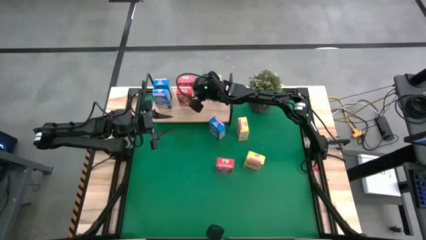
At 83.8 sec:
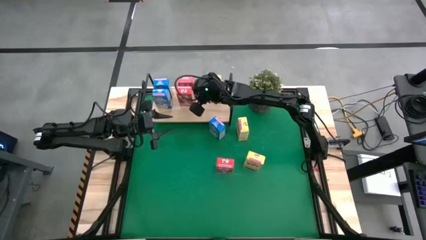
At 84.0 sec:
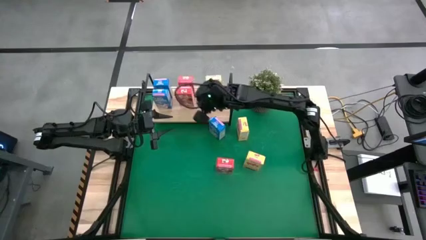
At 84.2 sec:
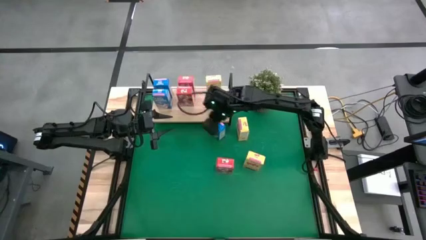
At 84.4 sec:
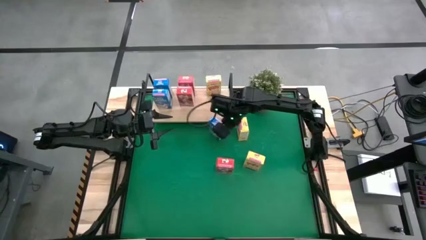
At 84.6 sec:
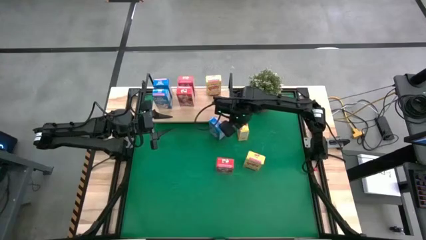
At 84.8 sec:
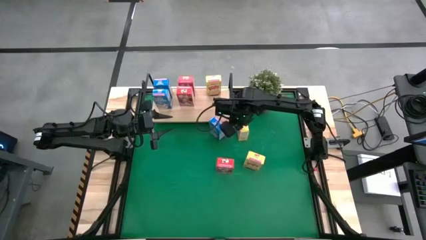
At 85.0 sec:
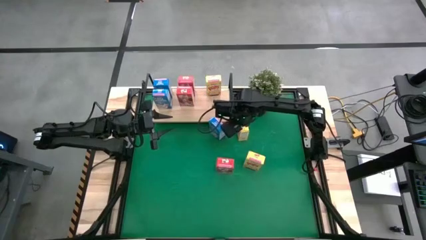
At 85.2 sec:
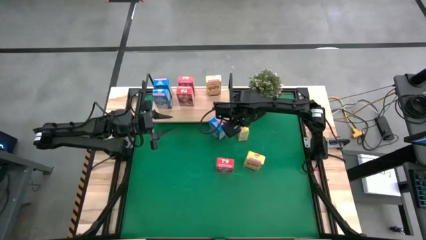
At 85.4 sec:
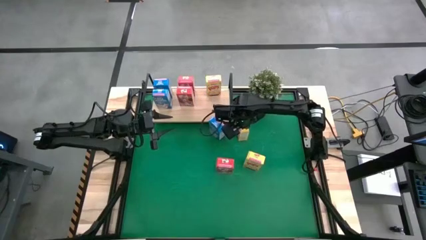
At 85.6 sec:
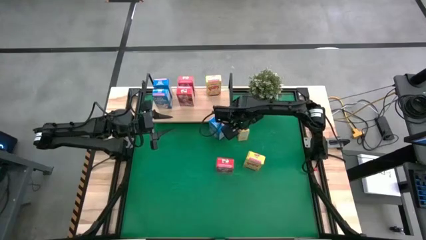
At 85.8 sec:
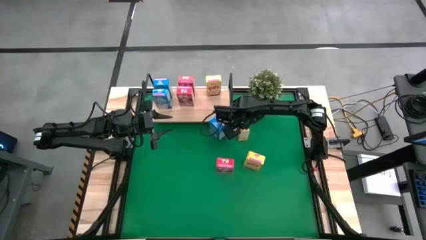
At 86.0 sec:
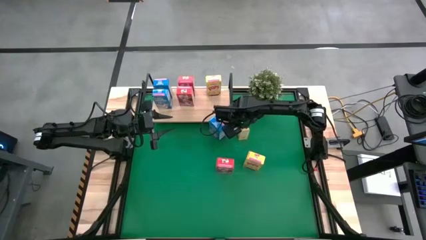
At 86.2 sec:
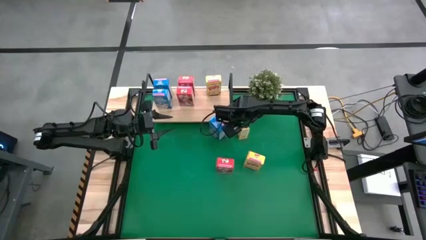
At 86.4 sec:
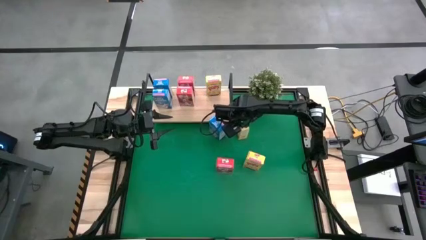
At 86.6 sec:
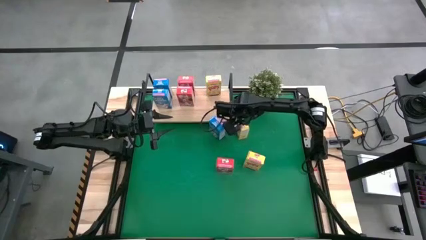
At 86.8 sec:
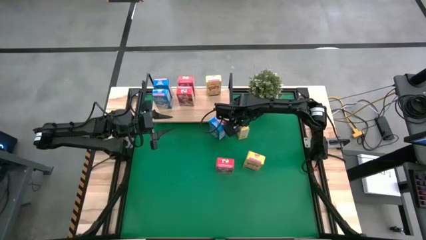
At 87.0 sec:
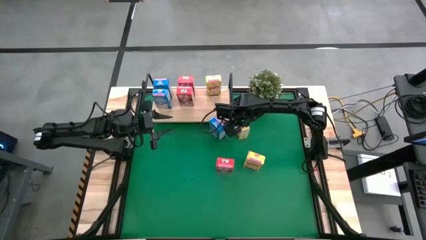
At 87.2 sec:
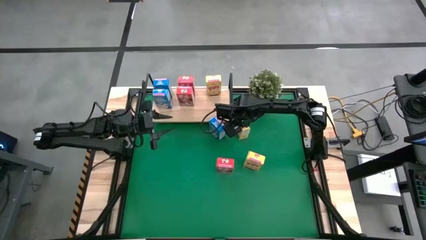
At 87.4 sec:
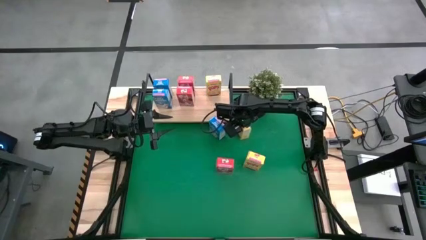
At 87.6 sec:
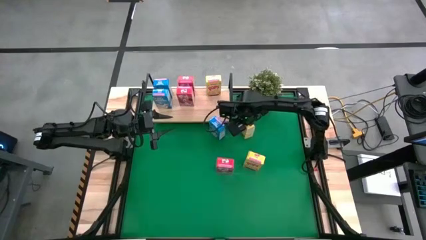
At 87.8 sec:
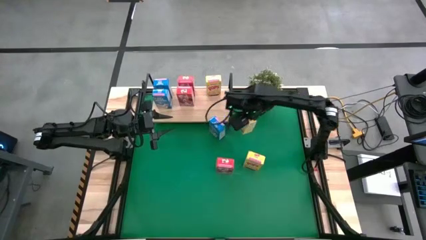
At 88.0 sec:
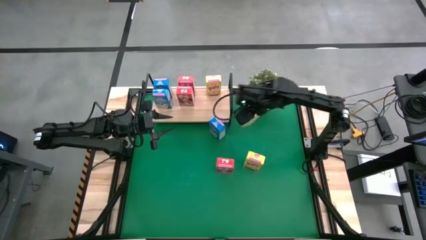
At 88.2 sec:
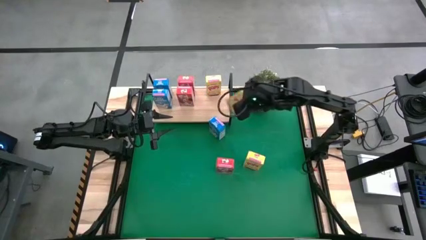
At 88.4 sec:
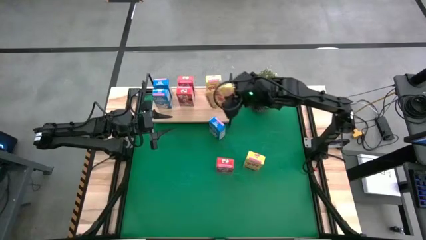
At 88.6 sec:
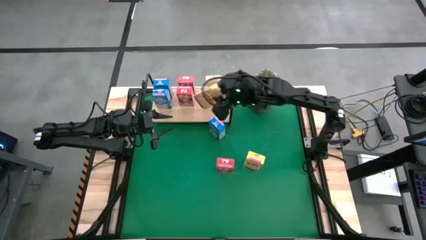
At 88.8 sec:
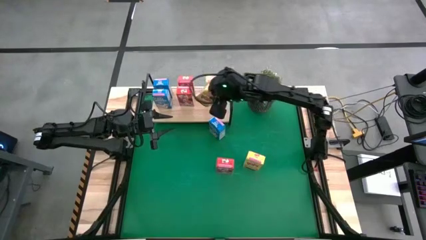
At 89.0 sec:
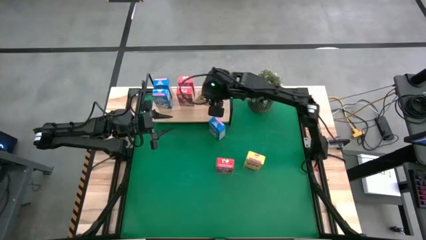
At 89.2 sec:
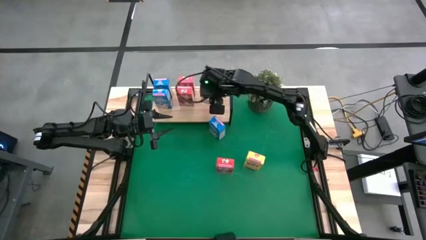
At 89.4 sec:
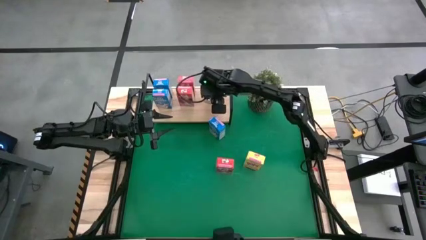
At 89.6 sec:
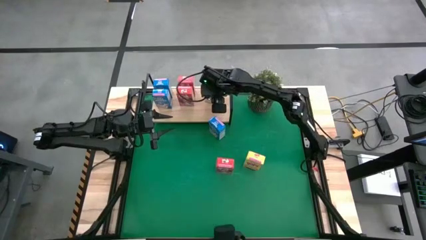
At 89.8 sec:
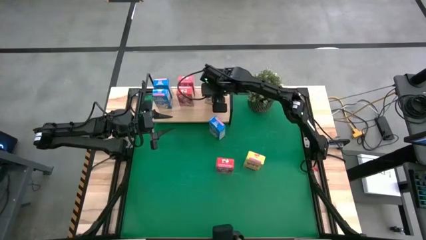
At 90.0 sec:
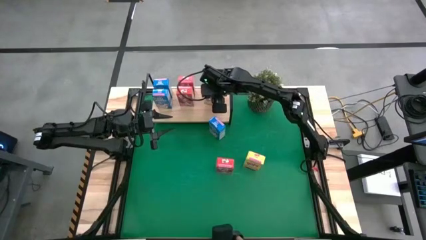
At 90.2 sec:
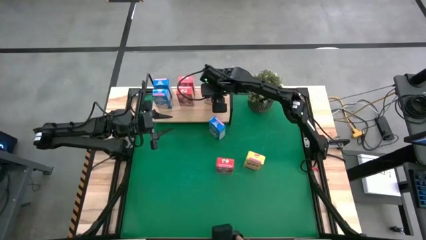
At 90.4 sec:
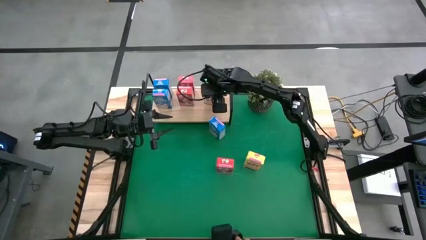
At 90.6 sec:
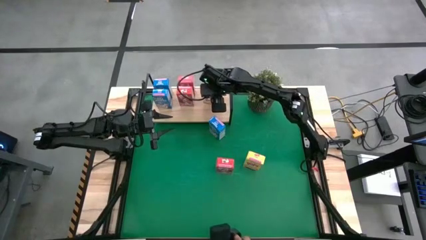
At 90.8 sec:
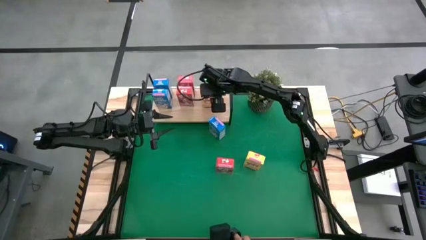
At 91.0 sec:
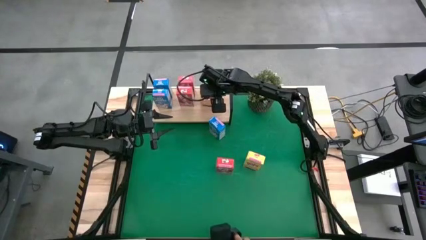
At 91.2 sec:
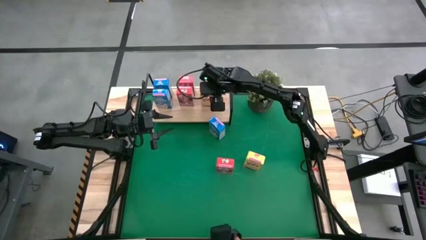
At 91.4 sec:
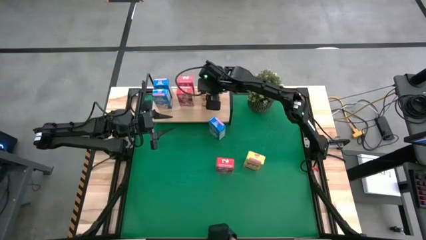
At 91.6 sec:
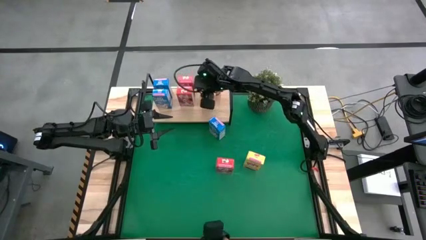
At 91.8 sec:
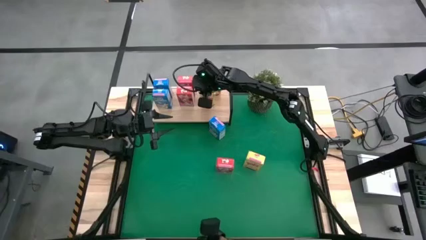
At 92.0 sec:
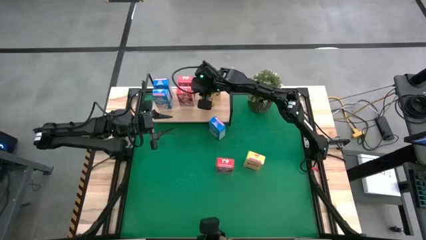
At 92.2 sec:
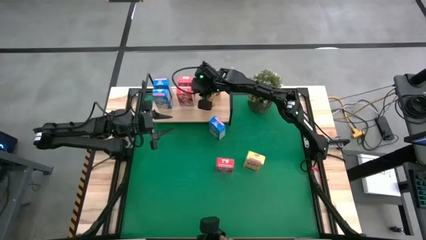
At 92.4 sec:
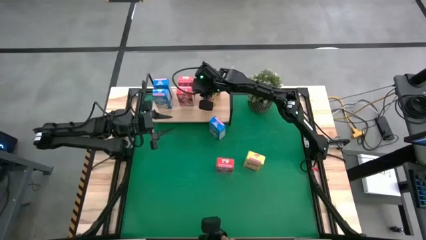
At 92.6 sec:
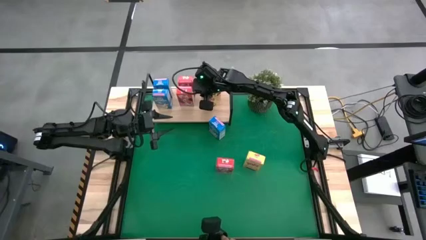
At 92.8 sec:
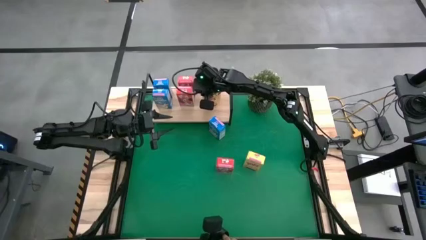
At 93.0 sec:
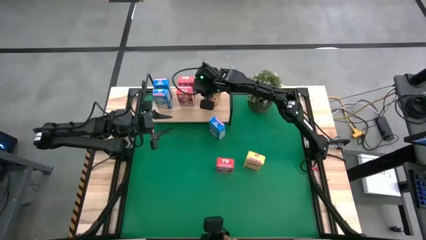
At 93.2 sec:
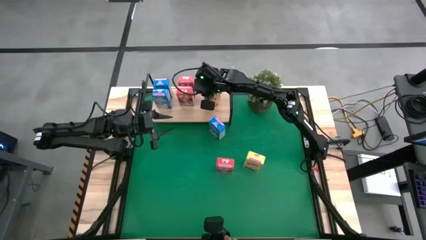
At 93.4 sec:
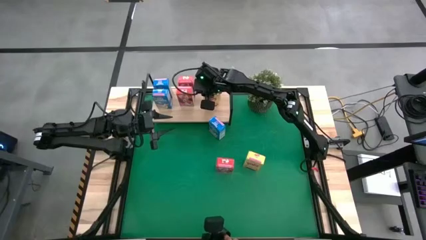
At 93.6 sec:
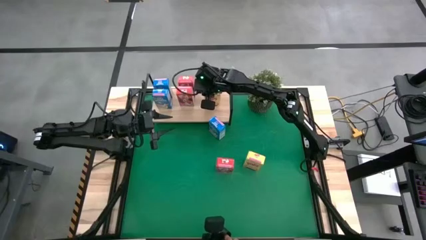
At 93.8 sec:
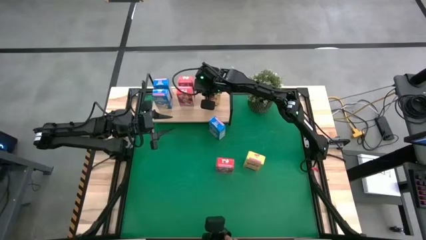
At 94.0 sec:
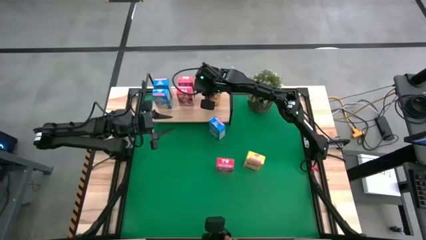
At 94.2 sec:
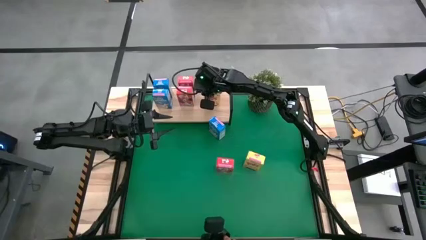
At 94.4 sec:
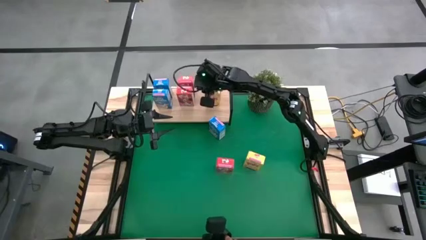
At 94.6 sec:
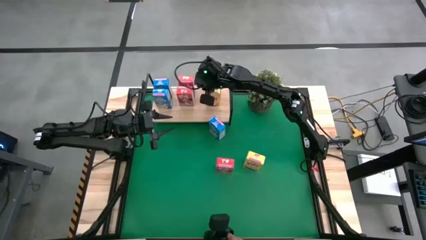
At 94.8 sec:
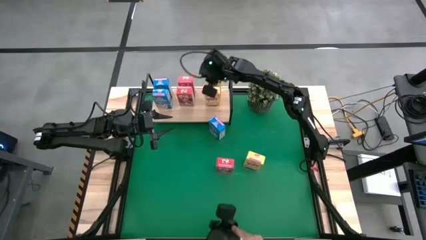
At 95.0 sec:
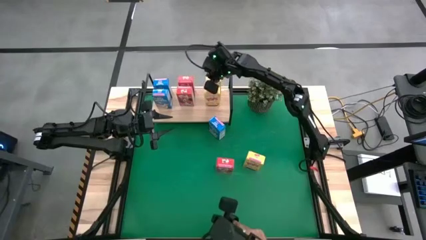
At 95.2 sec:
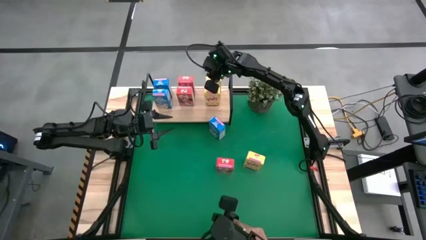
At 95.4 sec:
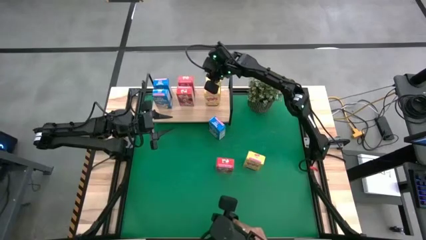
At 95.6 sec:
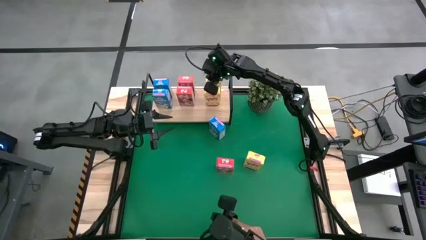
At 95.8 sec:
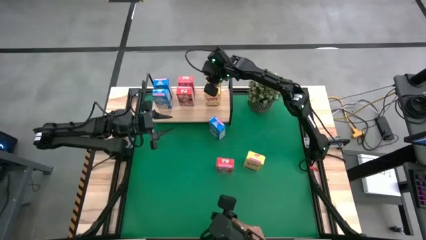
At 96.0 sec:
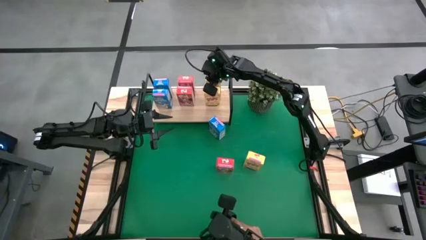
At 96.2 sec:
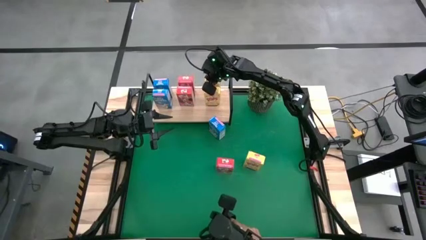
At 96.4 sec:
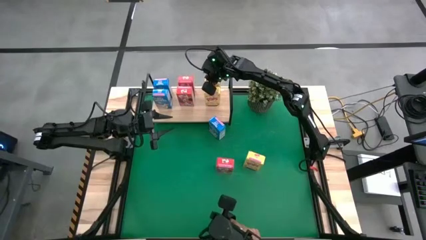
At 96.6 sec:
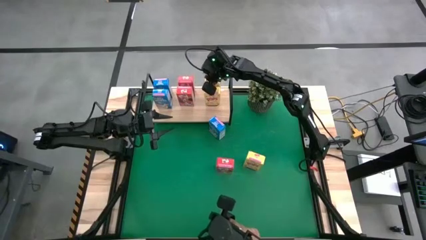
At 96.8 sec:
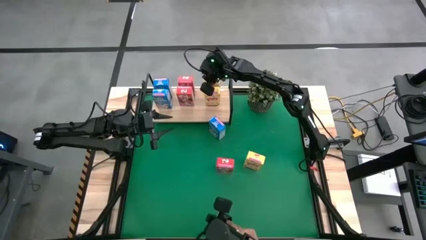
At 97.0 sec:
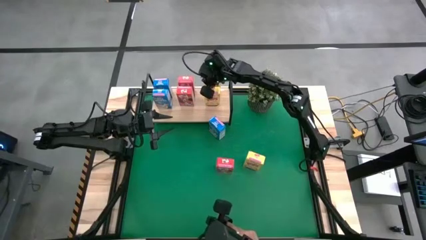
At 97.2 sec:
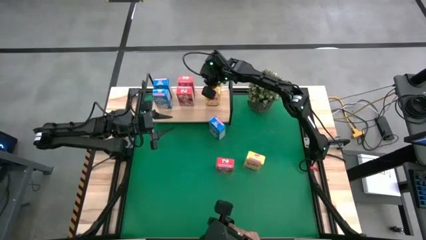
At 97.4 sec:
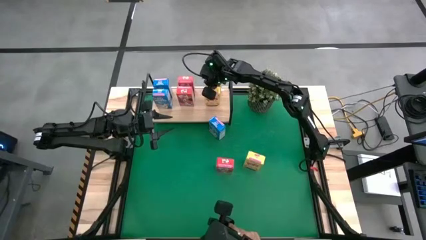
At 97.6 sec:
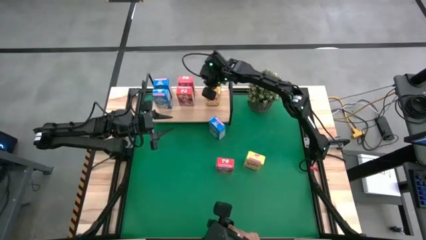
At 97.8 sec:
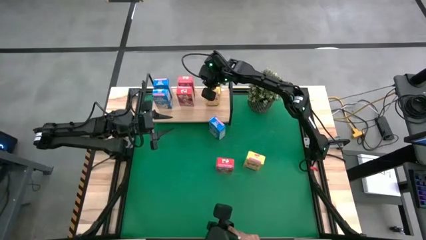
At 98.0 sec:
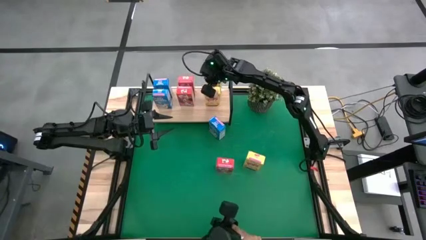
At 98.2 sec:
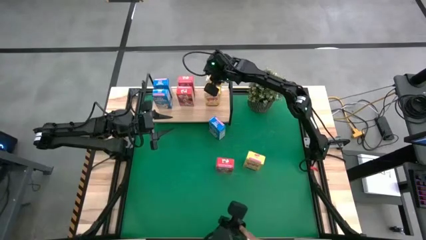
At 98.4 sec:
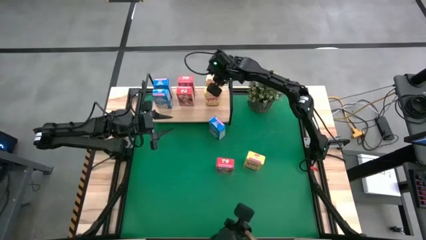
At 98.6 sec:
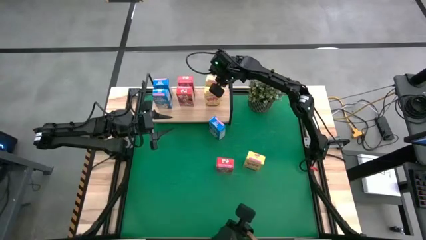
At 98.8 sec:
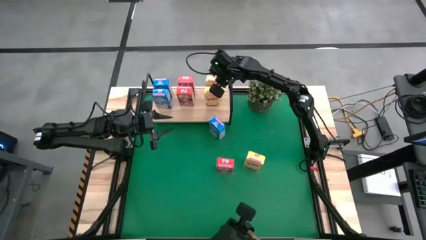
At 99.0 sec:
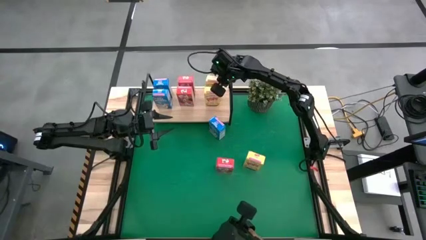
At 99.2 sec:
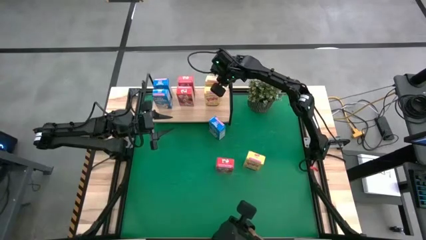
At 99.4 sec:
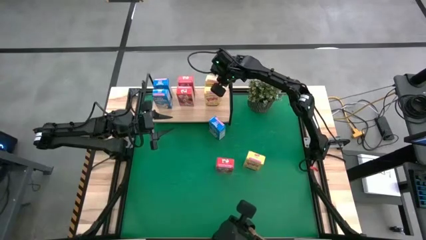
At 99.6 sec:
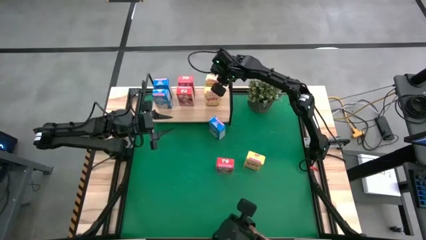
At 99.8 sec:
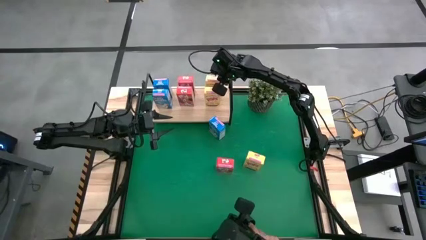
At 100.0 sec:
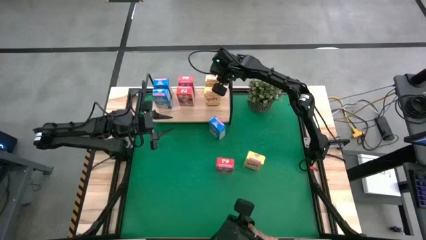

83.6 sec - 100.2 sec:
Task: Stack cereal on shelf
Put the top yellow cereal box aligned with the other yellow cereal box on the shelf
